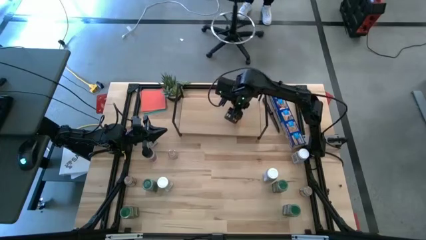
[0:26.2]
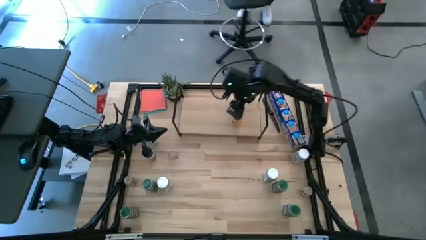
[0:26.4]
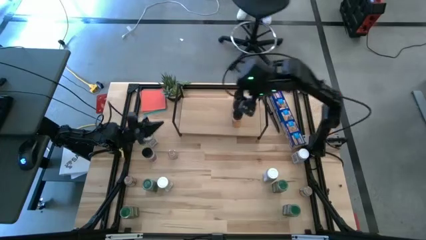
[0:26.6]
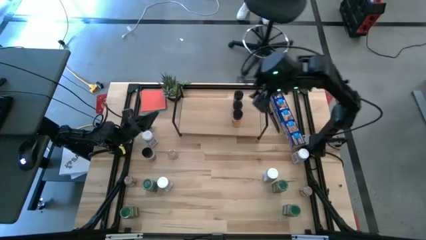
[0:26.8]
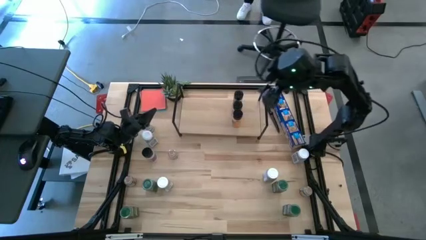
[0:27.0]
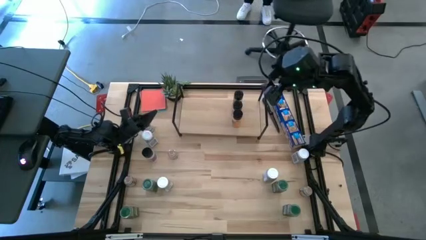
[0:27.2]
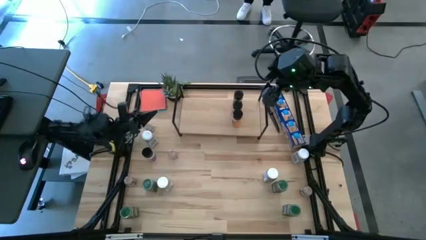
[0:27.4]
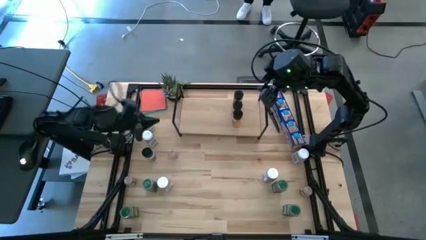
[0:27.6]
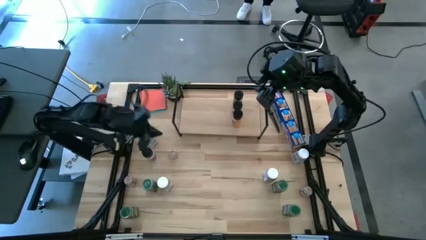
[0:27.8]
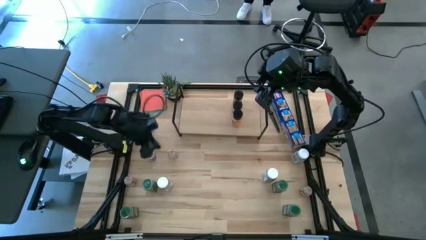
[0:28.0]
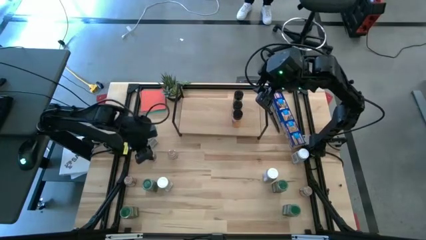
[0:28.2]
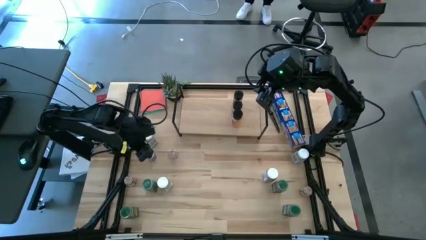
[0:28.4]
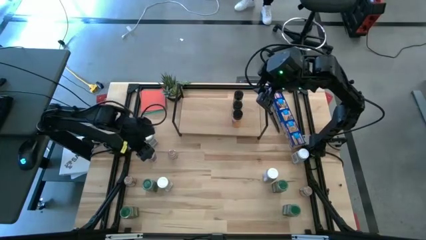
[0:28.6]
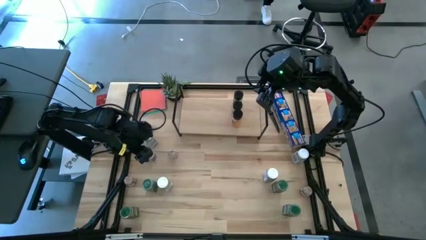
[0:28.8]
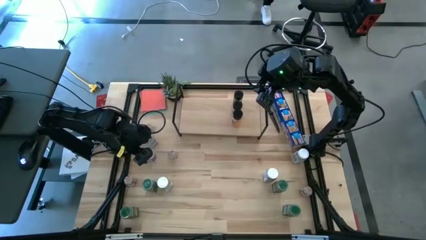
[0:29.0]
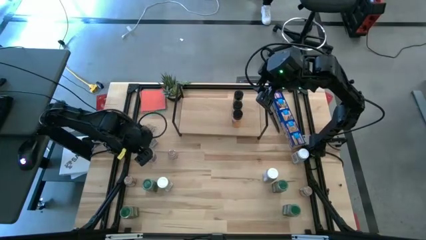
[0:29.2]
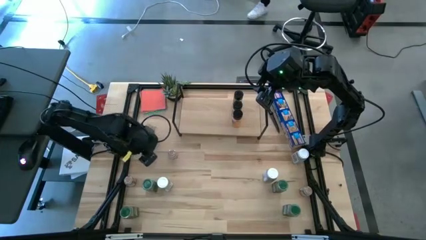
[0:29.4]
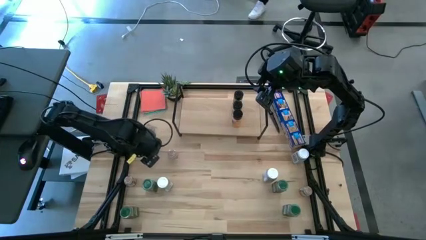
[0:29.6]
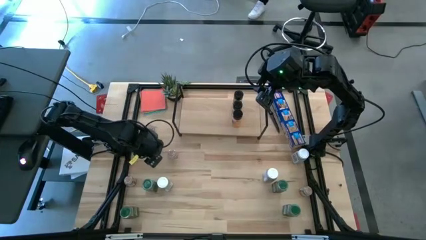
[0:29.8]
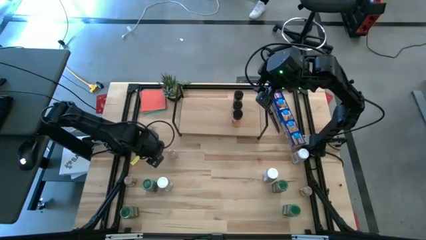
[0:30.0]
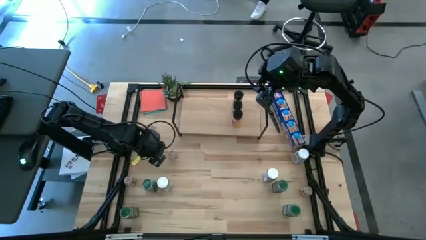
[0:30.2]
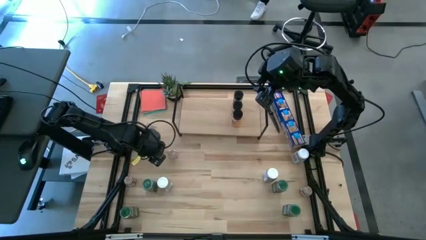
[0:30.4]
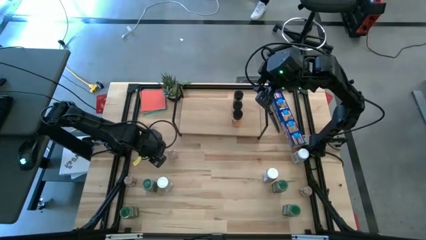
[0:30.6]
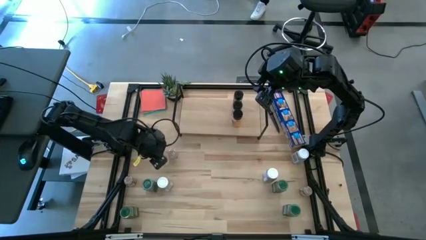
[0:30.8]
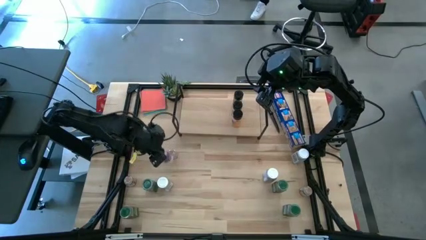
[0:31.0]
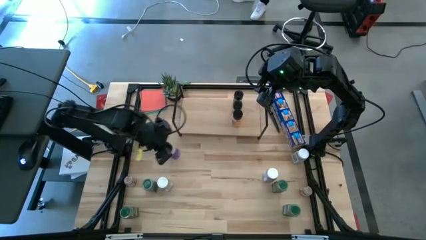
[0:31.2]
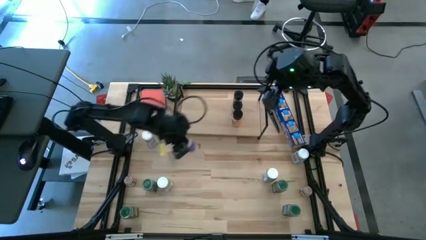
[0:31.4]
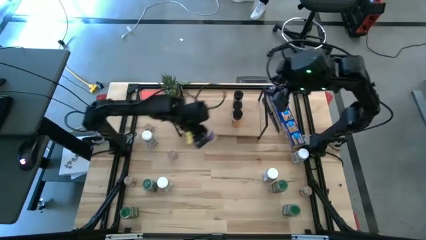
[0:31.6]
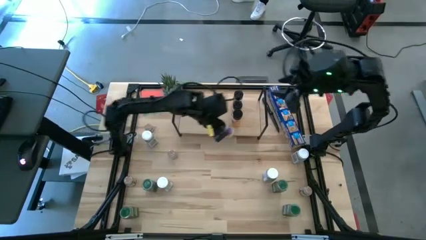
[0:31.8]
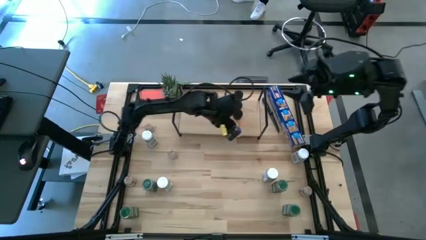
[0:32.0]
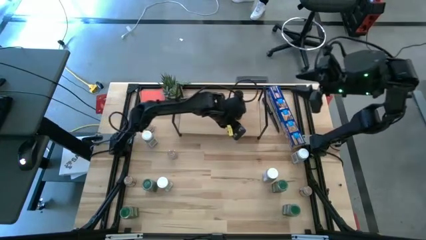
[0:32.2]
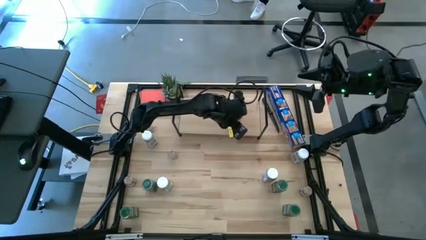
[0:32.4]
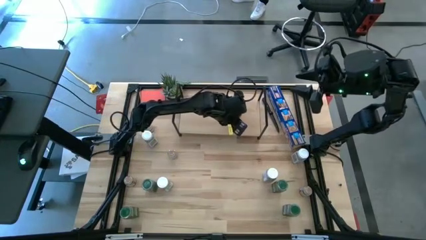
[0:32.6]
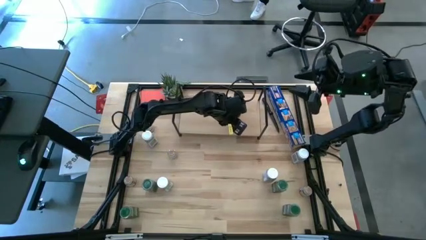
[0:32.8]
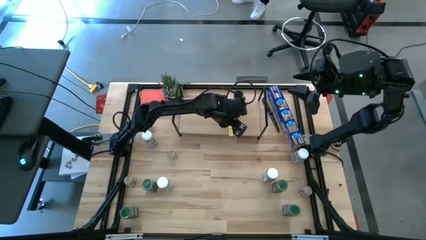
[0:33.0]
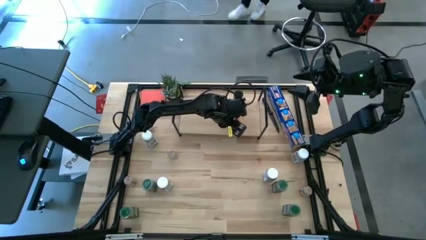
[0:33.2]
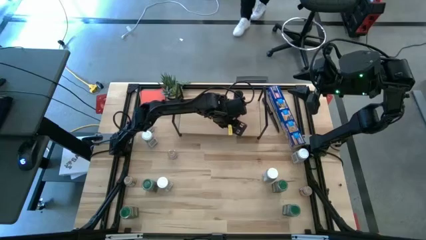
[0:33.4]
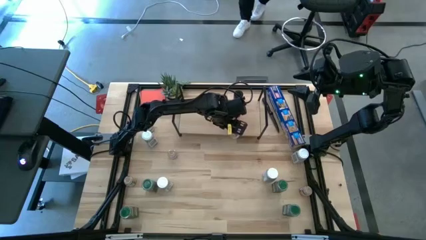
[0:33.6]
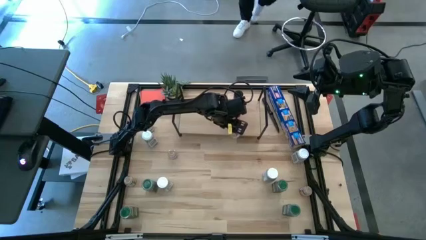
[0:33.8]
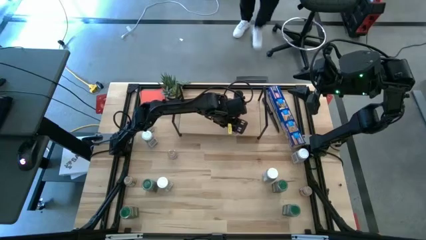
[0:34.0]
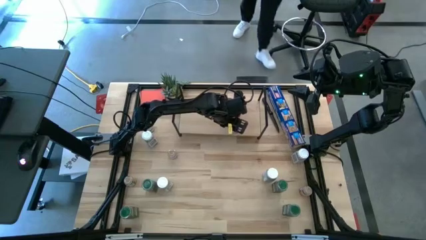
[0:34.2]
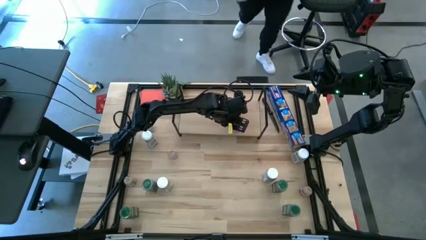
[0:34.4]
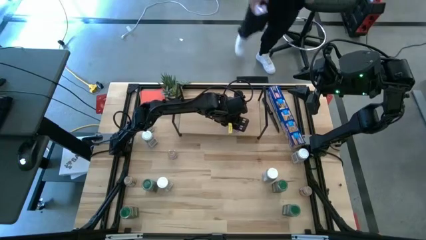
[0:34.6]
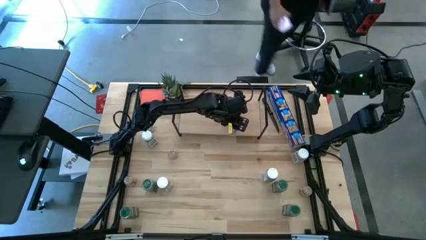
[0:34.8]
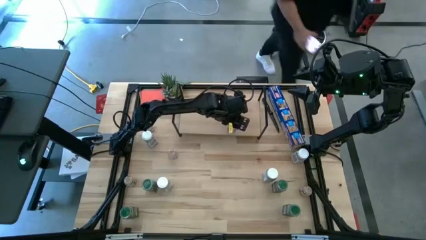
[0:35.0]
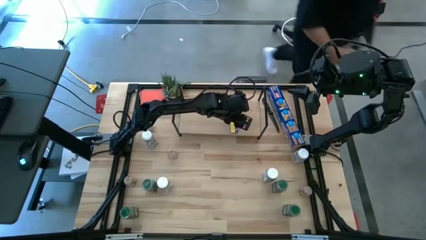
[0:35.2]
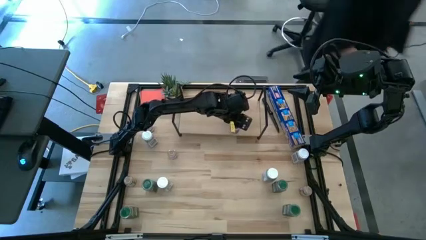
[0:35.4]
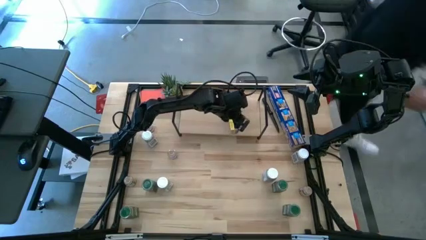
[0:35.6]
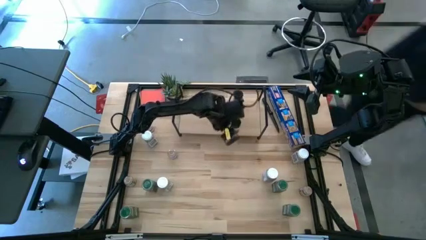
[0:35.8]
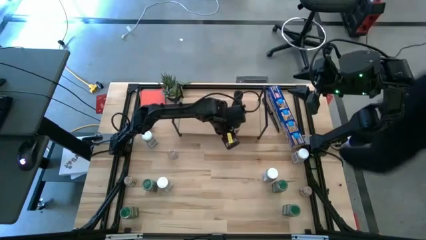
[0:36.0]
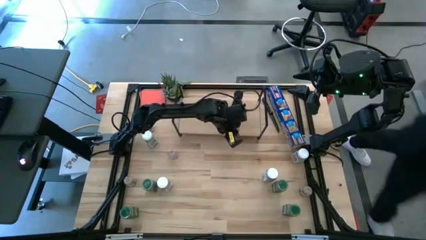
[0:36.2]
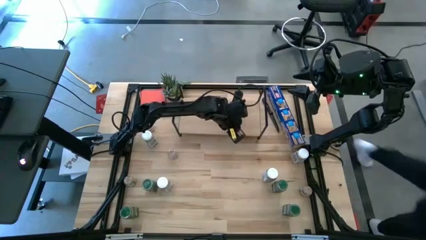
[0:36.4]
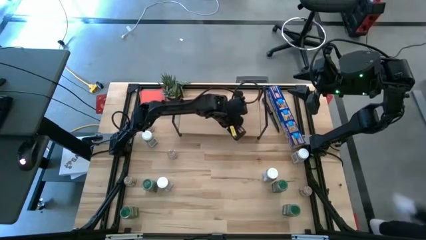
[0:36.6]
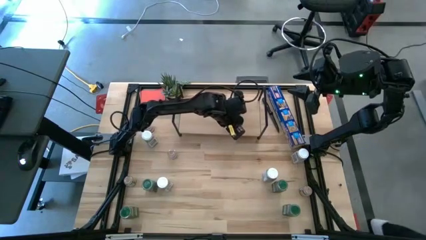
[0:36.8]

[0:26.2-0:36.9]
Task: Shelf spices
Put the black seasoning bottle on the shelf aligned with the other black seasoning bottles

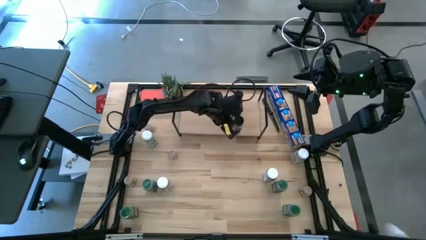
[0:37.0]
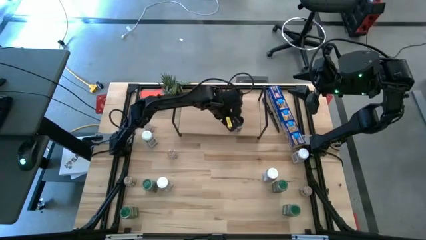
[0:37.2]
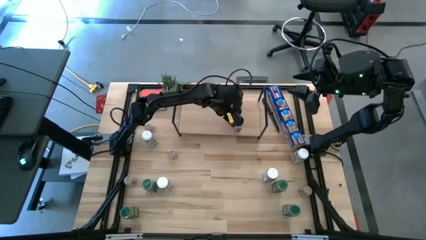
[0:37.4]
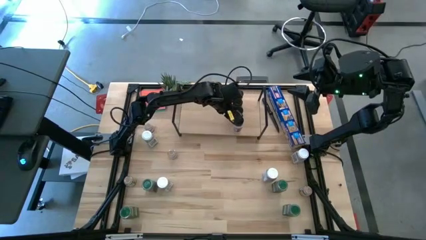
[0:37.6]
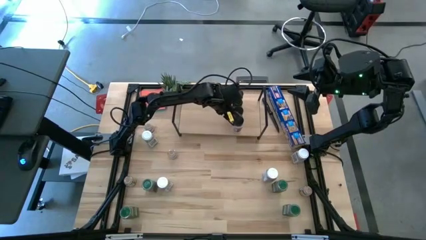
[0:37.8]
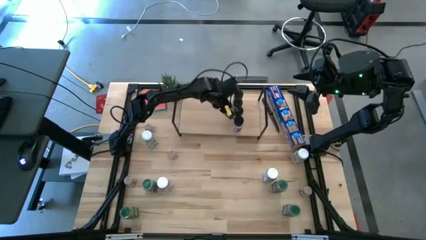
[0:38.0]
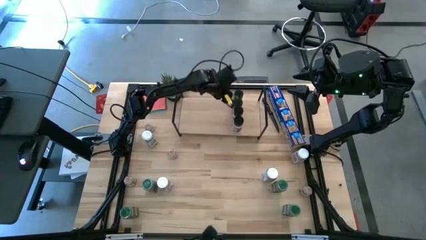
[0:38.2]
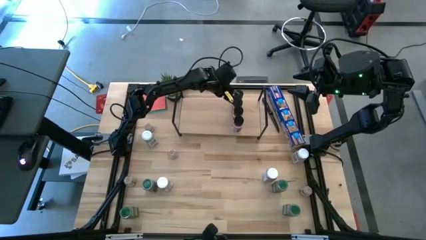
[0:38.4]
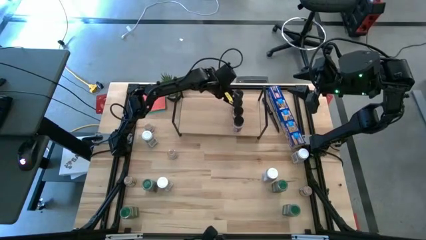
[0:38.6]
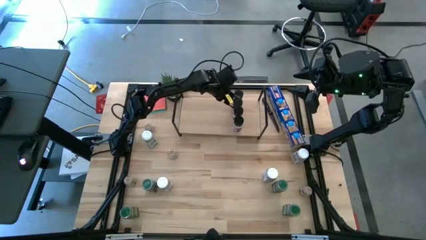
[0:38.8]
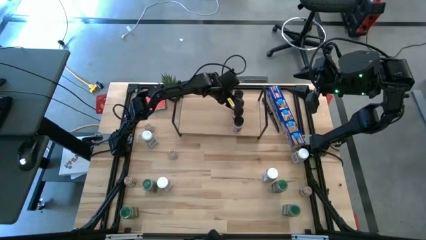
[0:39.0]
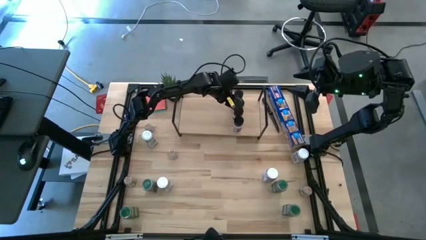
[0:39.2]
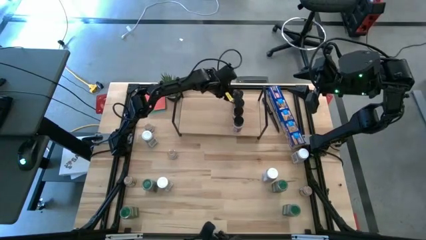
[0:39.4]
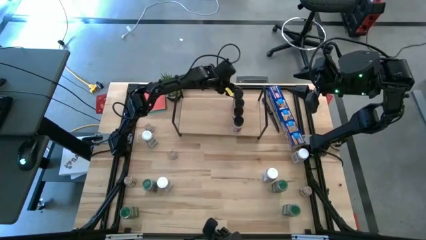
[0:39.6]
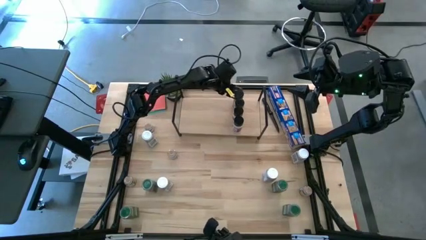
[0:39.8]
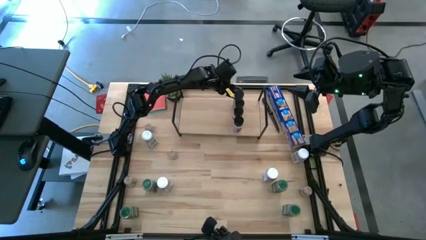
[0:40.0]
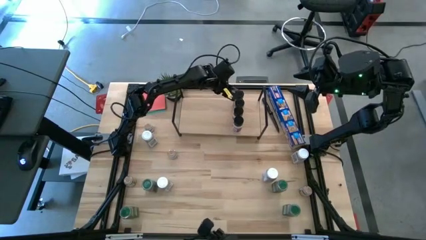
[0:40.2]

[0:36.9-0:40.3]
Adjust the black seasoning bottles on the shelf

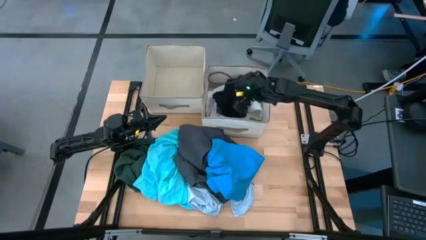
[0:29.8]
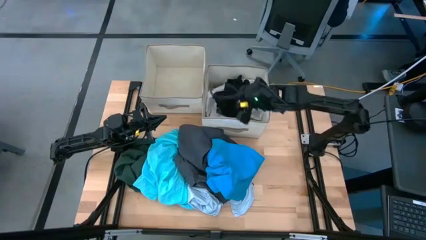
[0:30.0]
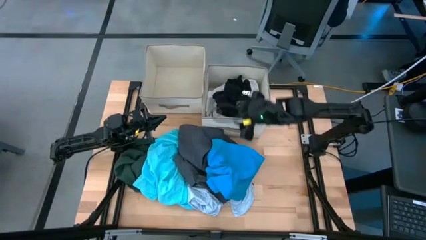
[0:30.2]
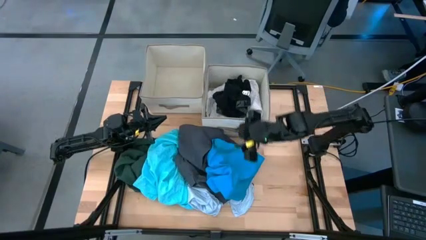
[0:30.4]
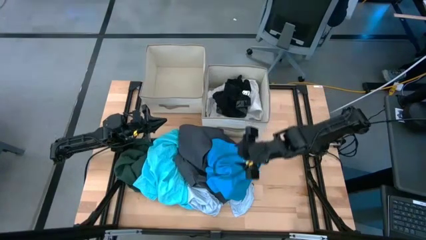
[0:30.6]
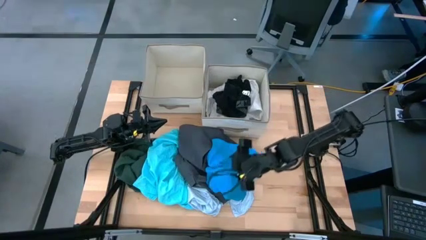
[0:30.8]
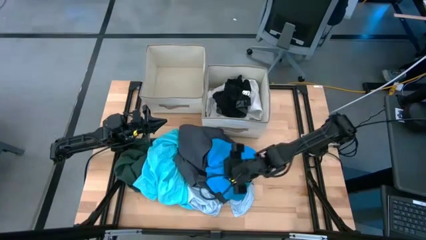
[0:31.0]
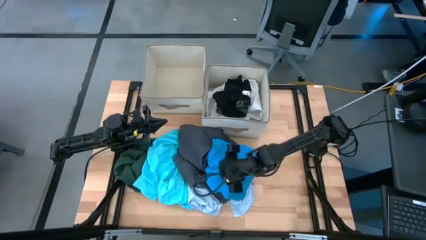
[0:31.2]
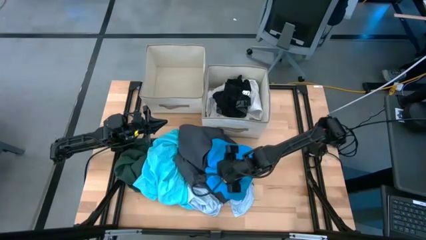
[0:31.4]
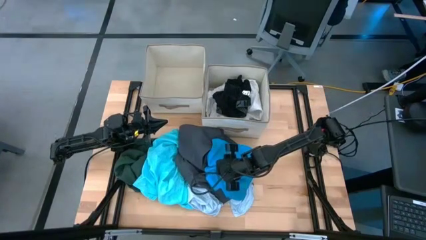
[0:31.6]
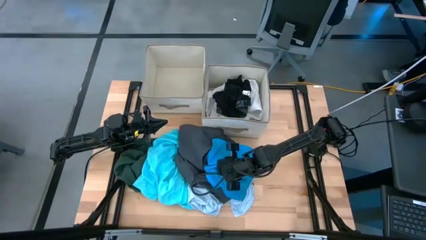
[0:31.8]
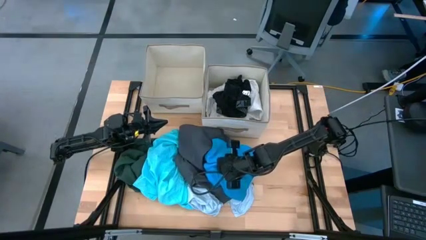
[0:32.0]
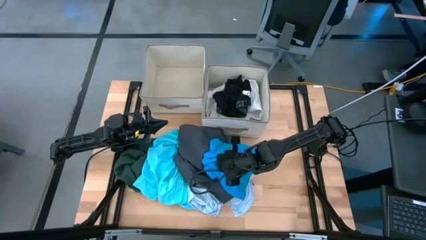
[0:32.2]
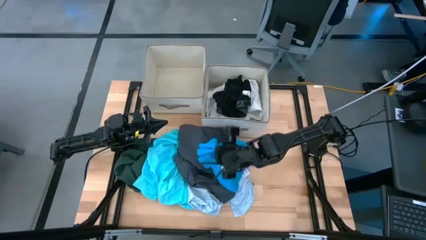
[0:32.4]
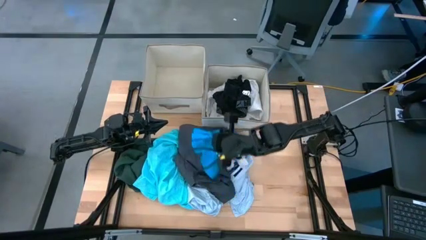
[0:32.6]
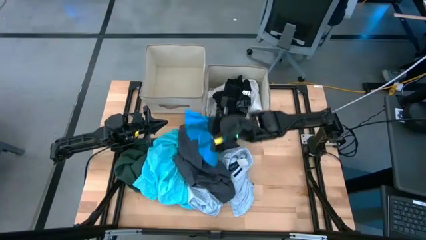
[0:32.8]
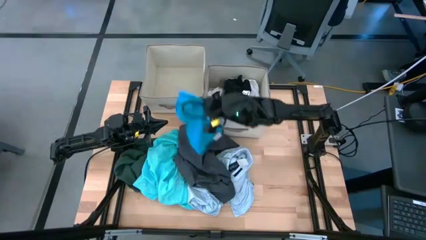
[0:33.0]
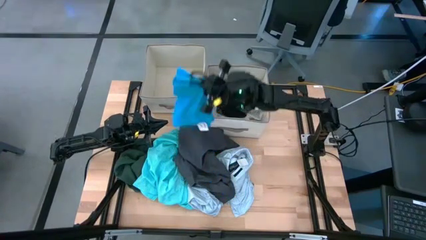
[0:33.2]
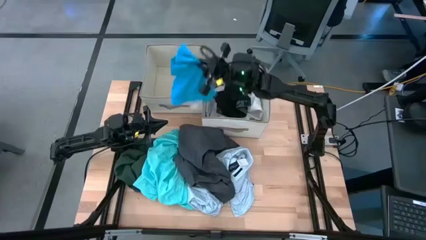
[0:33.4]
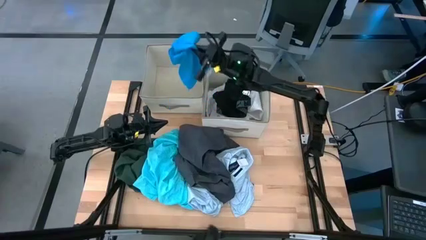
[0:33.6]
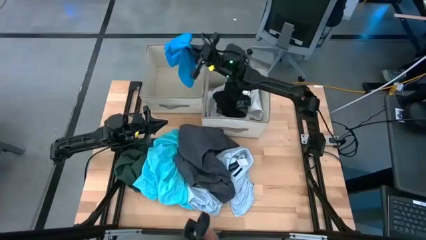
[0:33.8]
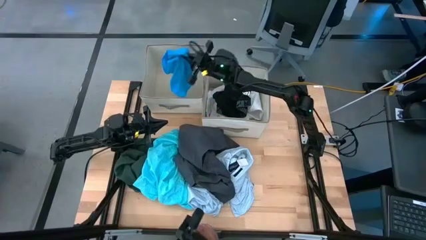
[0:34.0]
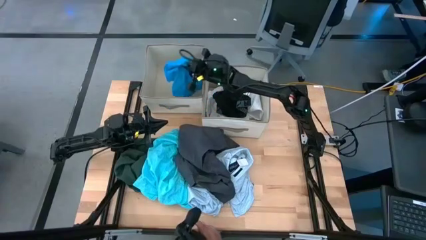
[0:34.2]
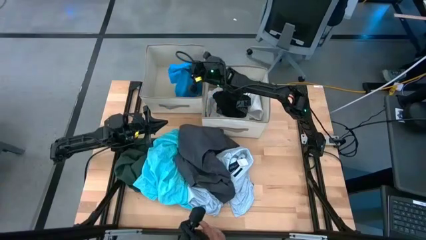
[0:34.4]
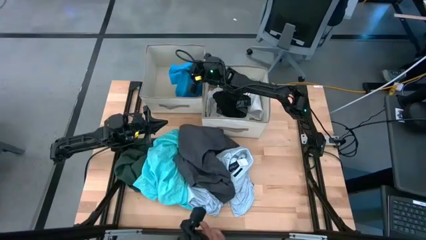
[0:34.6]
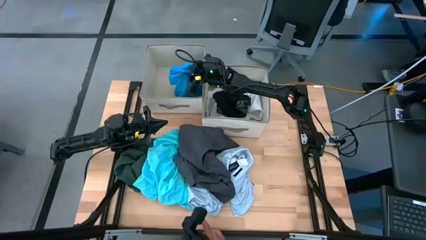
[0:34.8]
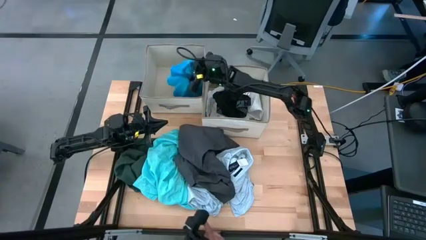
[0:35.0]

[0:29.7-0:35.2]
Task: Sort clothes
Put the blue shorts into the left laundry organizer
